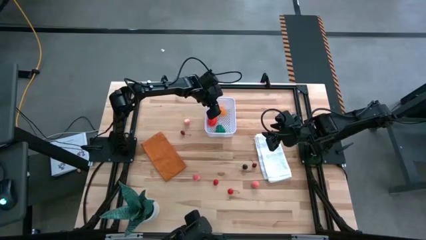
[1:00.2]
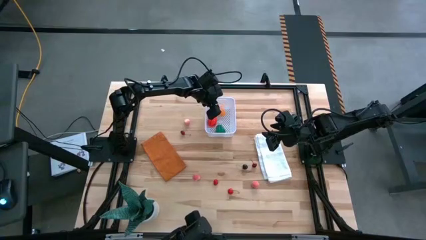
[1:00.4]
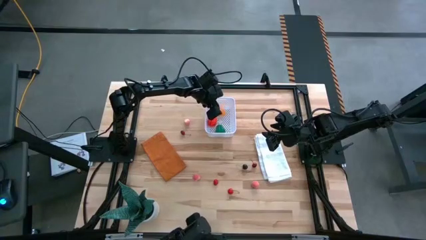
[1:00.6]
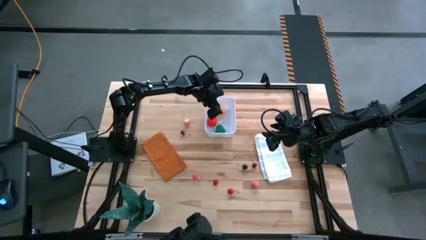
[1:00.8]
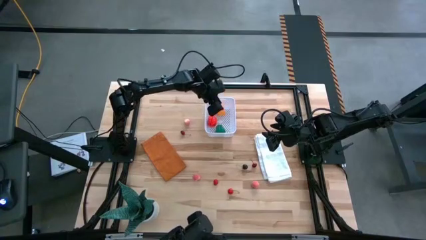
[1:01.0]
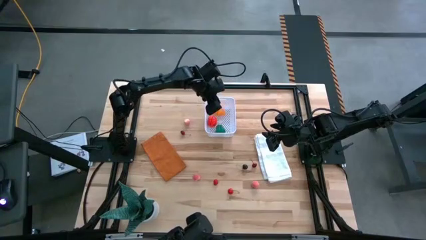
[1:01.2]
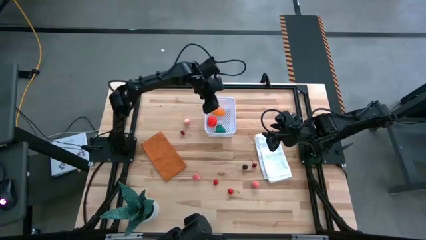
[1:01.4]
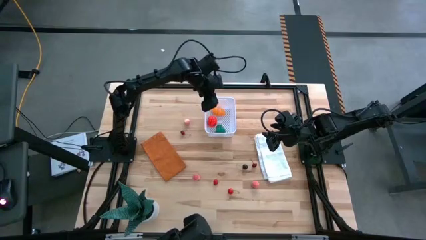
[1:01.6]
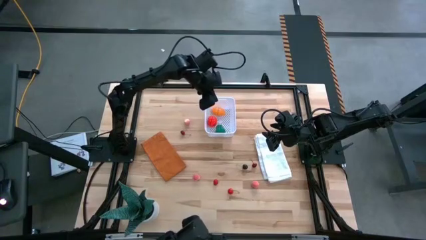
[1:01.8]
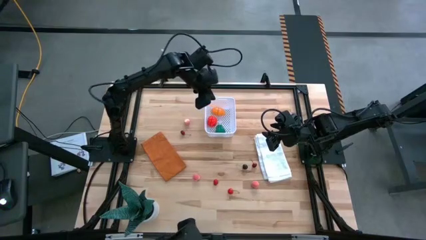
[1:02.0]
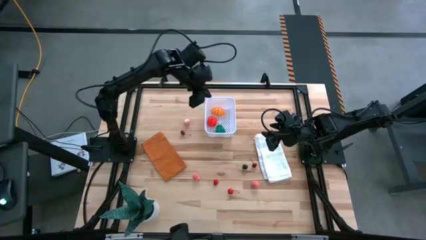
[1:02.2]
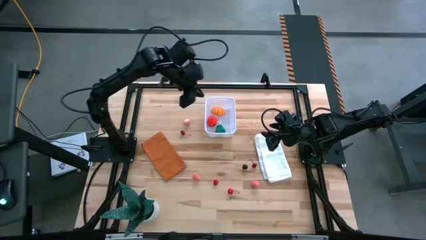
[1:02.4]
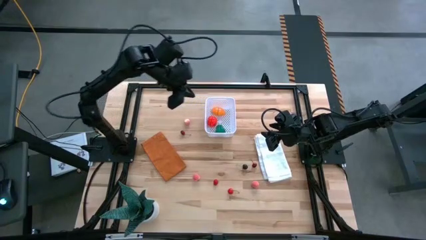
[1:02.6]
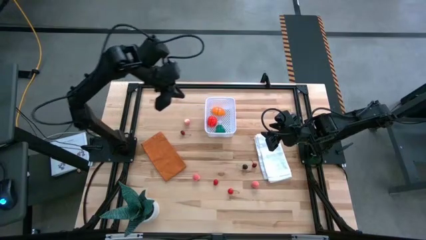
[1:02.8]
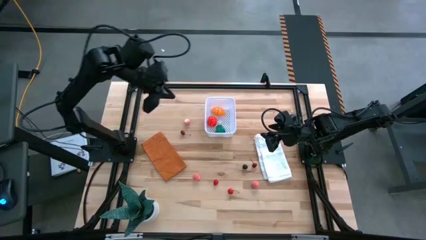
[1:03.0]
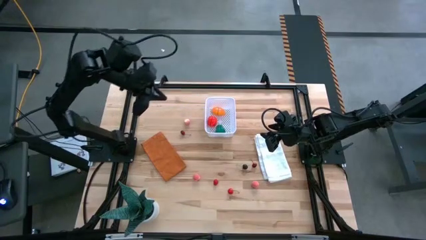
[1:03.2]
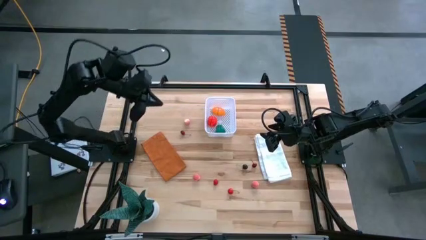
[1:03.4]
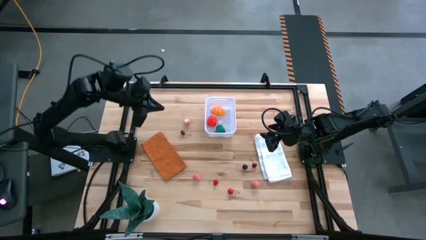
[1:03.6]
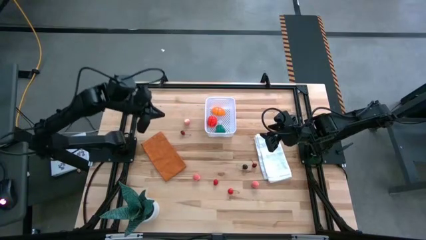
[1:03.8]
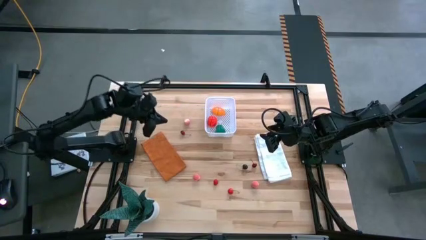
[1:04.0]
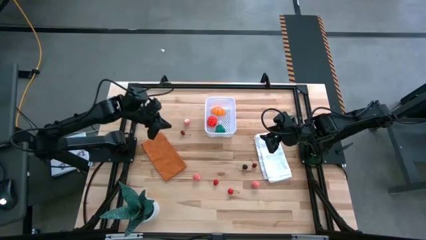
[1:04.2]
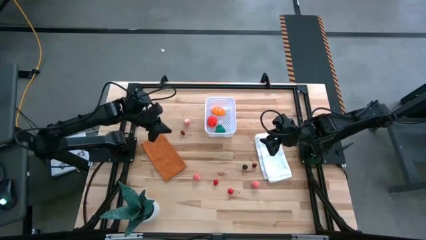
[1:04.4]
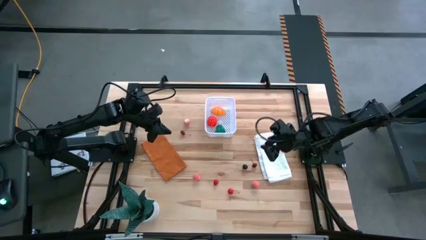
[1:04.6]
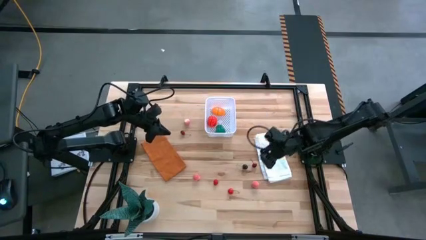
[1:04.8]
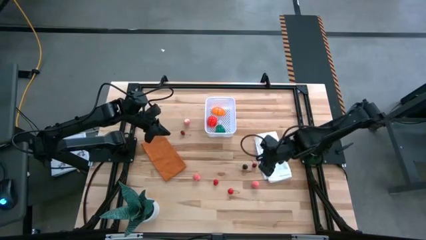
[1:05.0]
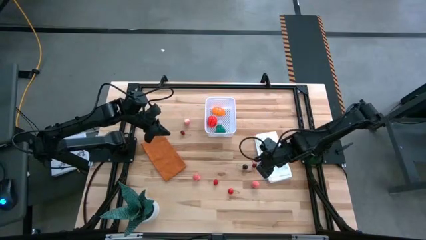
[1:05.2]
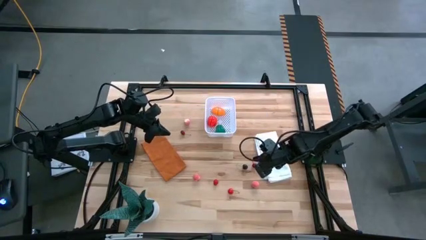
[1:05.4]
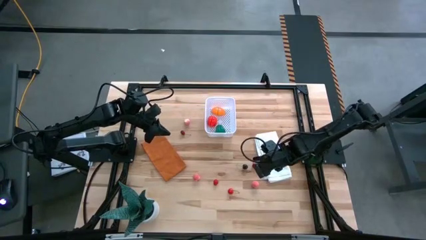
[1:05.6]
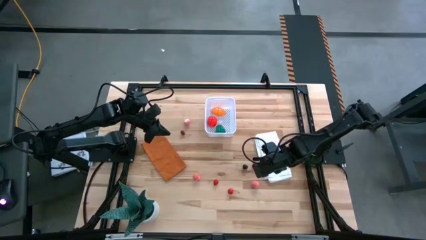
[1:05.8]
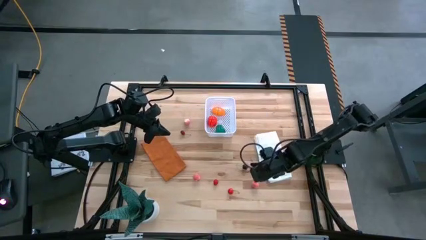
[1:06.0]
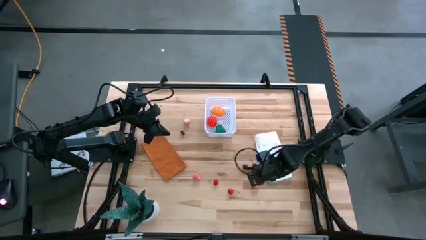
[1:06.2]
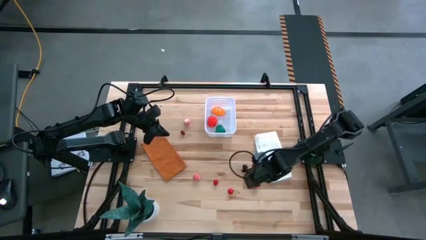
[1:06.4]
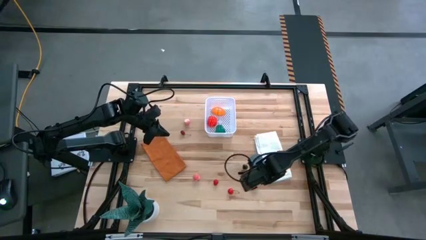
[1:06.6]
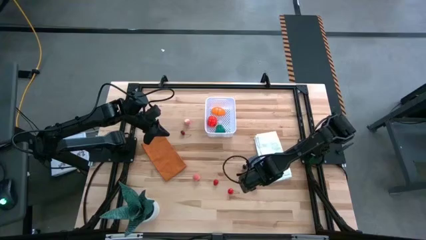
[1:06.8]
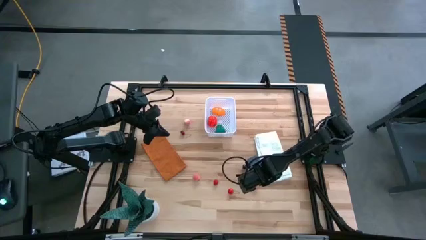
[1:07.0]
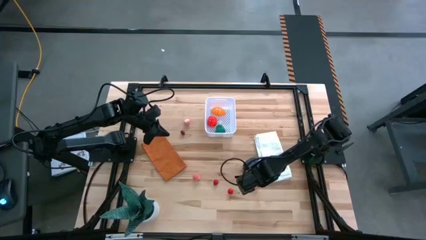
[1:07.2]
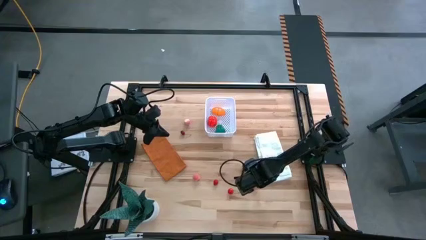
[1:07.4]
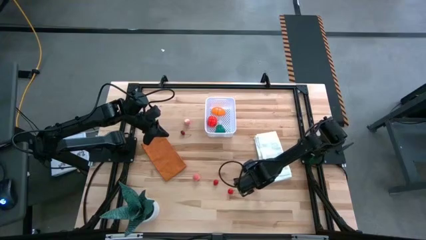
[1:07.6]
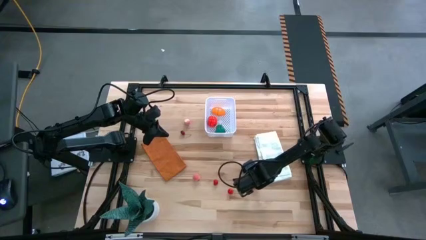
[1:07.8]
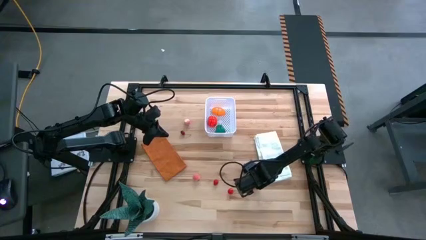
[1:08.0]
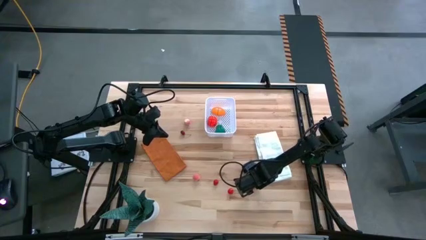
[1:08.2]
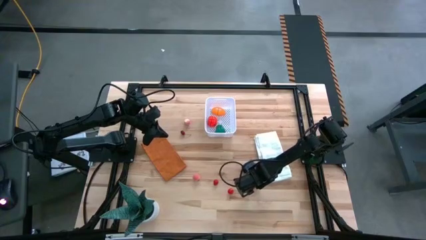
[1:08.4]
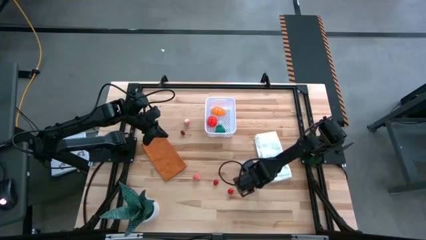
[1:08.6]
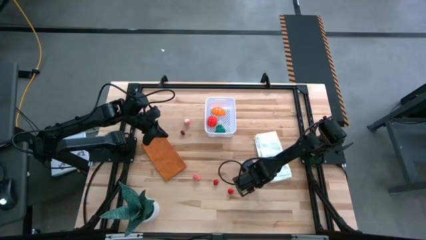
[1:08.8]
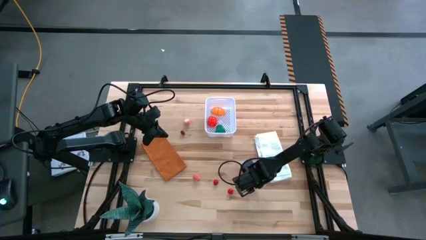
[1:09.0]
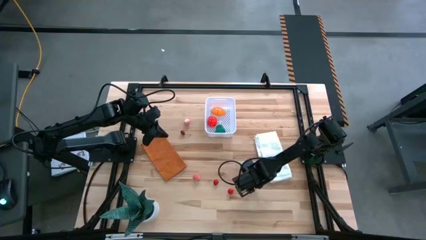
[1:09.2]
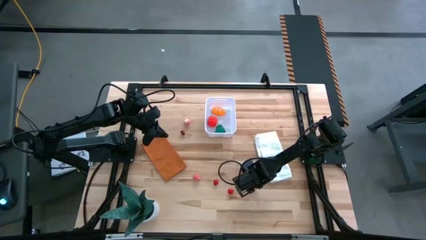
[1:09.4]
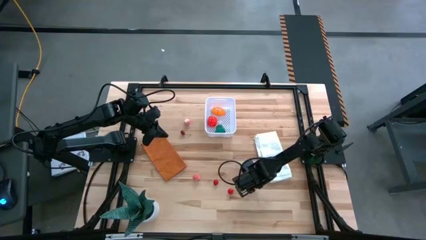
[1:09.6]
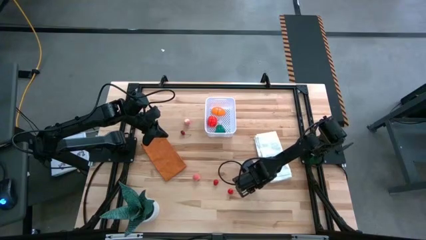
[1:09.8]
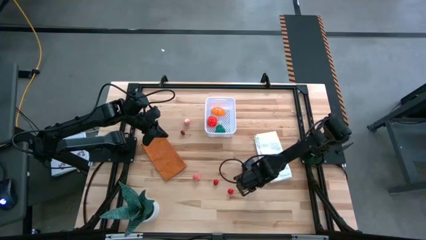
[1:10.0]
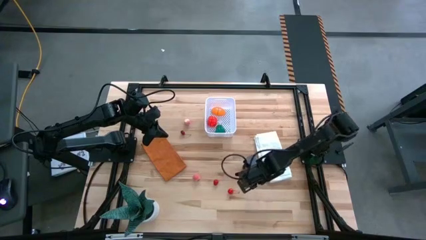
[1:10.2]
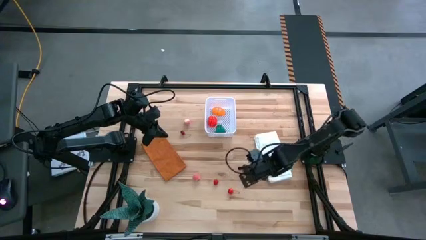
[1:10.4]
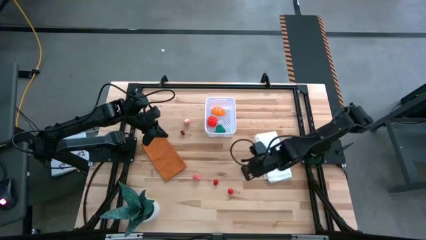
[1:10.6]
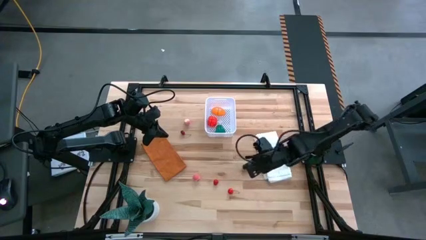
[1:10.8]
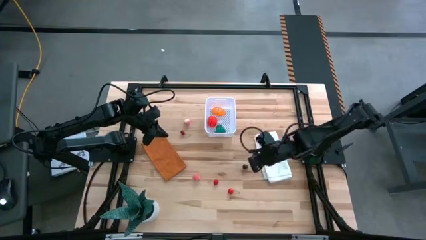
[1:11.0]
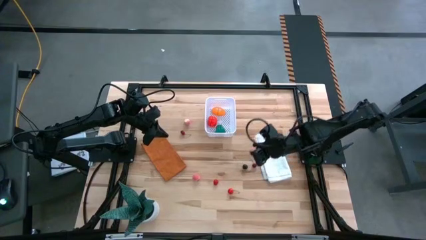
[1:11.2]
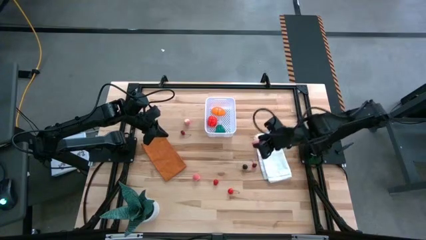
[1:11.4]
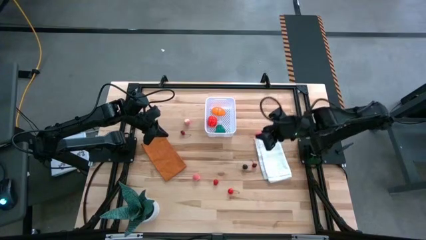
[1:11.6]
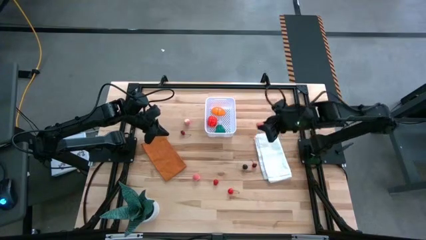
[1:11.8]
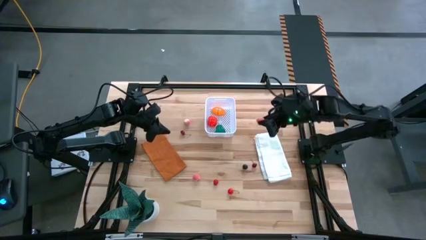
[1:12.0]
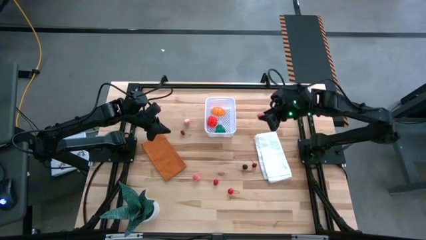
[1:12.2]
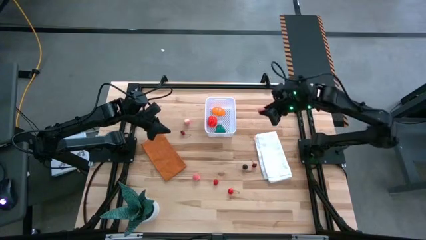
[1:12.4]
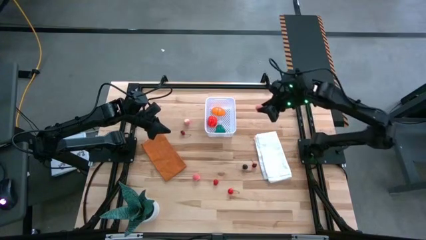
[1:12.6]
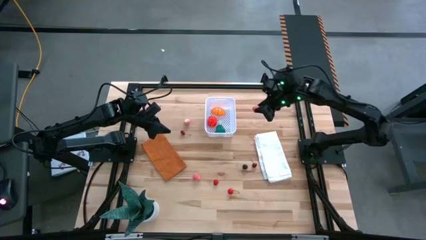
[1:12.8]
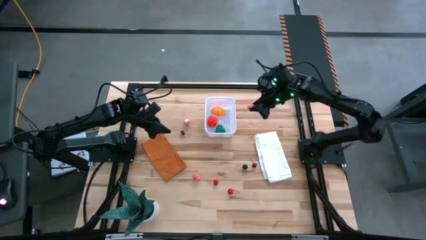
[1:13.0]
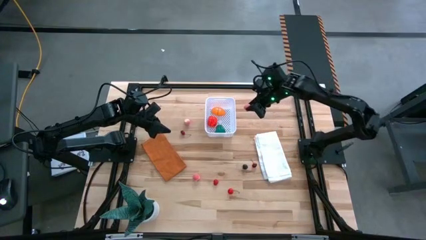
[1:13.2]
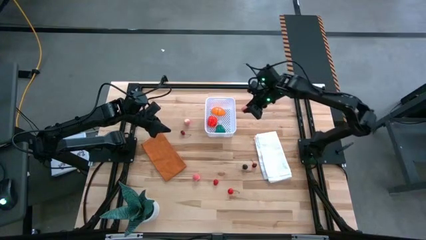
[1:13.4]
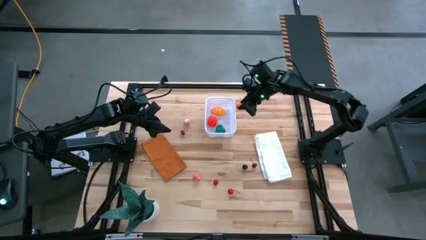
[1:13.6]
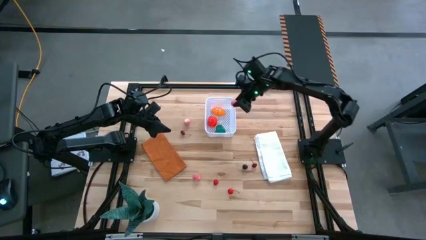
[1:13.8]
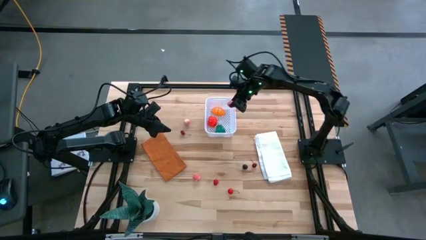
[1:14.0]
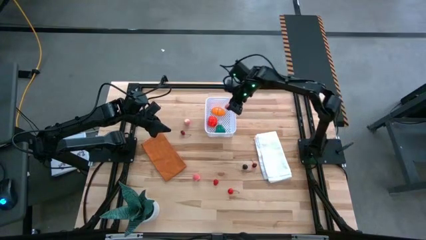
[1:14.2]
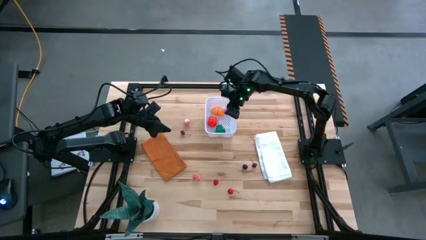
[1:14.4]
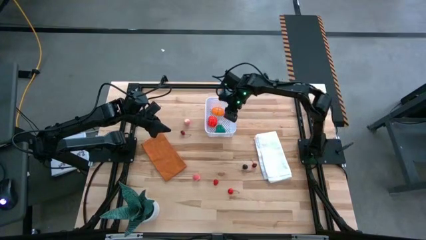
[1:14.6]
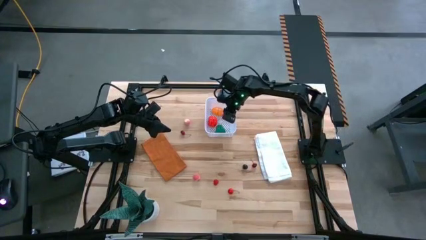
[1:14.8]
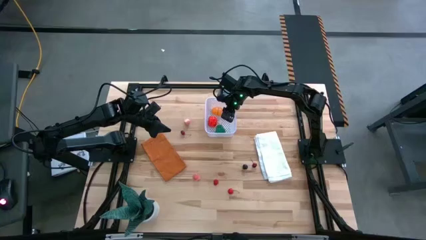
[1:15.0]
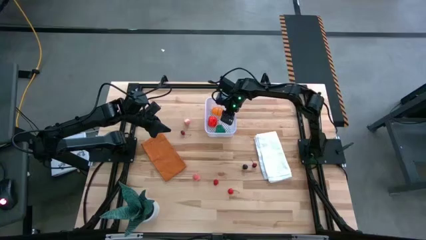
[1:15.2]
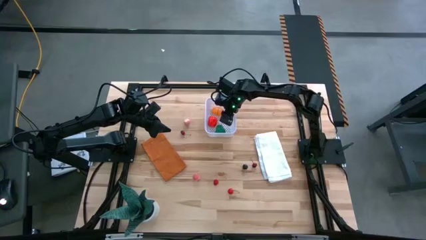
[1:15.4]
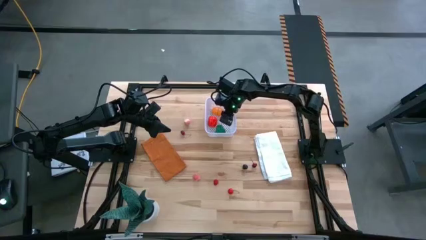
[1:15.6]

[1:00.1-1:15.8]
Task: Pick and placing Produce into tupperware
Put the peach into the white bin

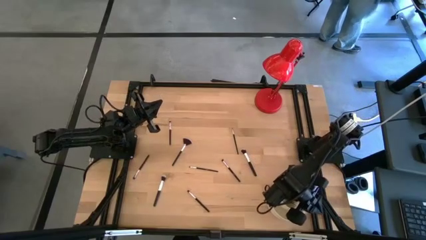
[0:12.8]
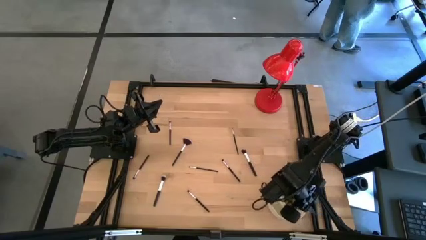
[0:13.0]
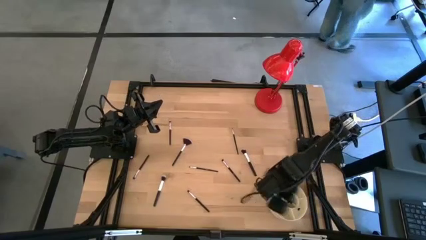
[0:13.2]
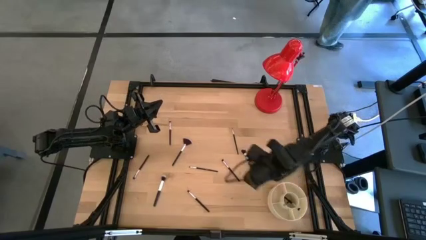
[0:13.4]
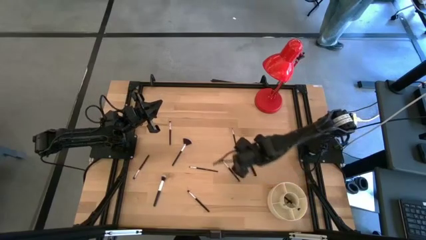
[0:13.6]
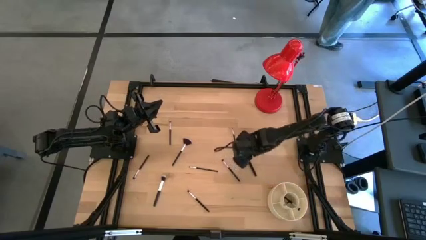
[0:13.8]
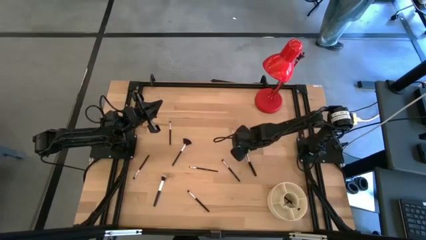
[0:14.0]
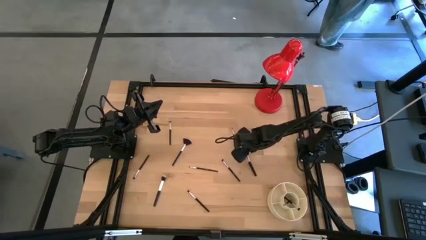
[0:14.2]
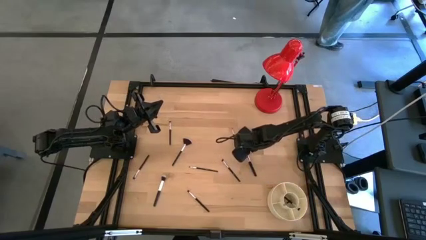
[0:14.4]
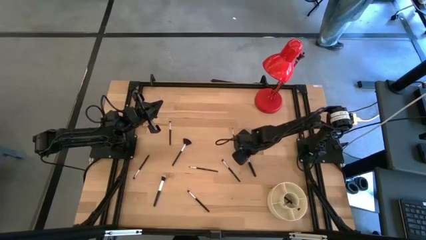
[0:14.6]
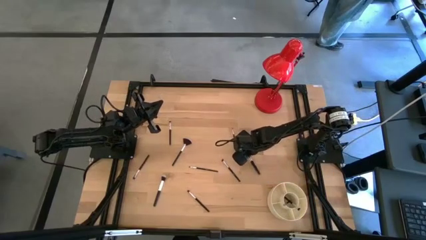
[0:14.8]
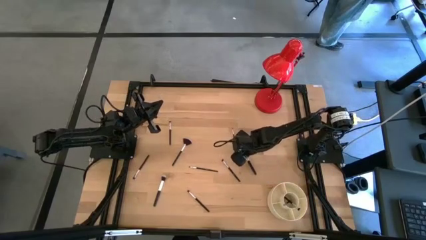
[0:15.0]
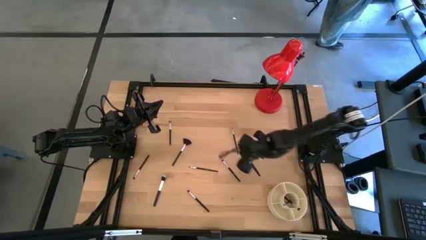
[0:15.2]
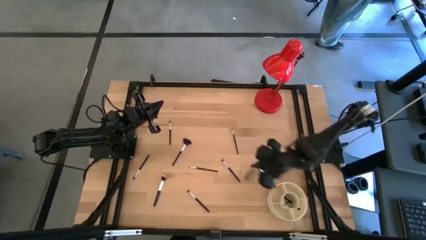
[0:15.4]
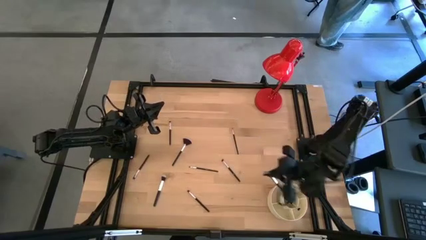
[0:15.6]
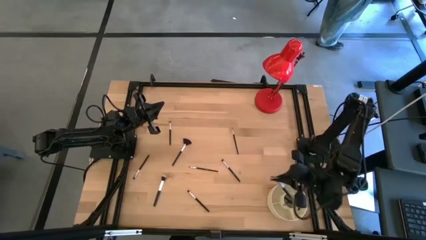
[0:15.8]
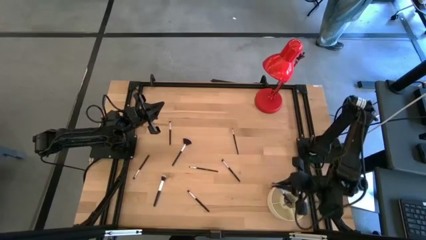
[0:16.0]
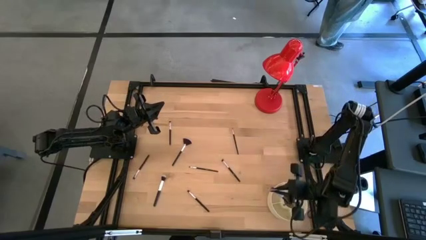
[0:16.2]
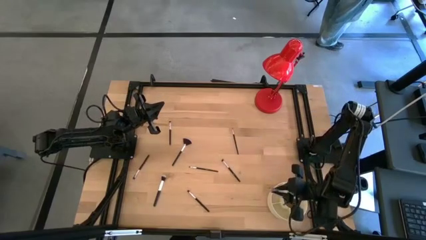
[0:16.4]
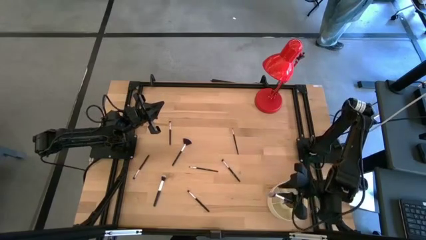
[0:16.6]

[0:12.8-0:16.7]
Task: Put items in baskets/containers
Put the black powder brush into the yellow pen organizer
